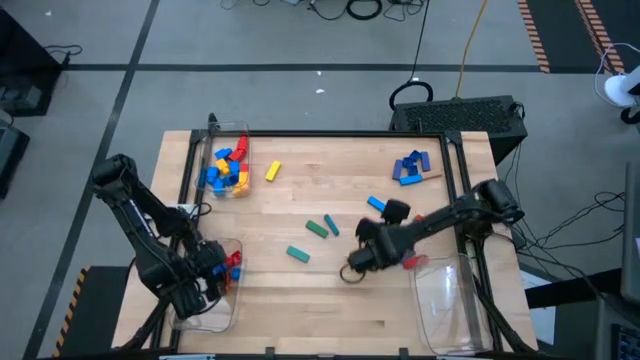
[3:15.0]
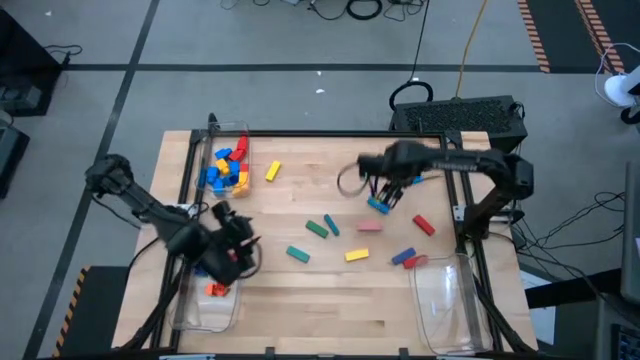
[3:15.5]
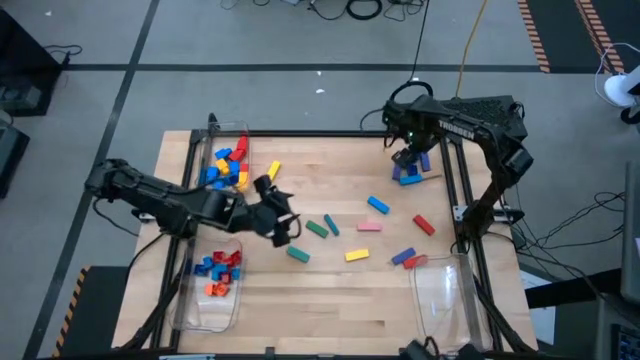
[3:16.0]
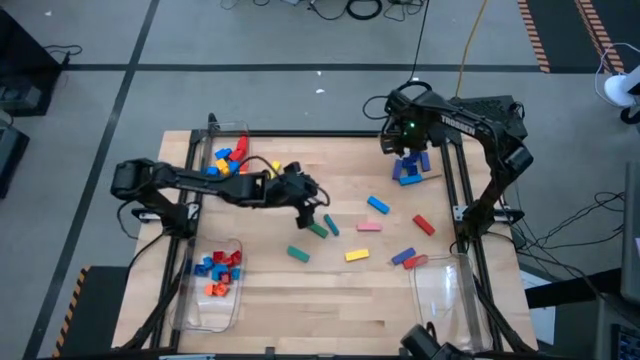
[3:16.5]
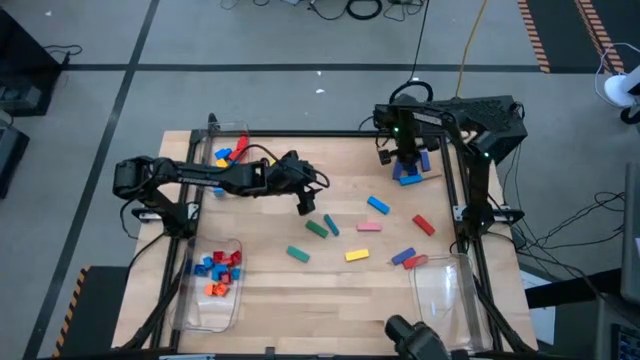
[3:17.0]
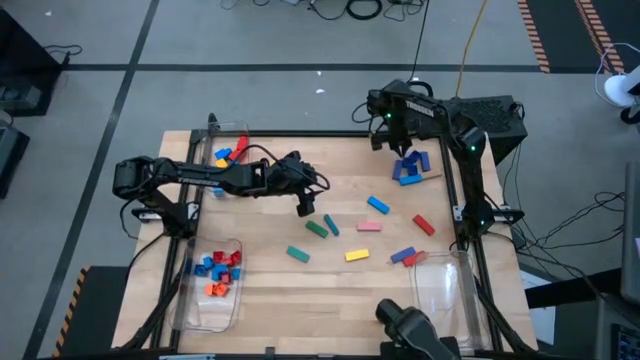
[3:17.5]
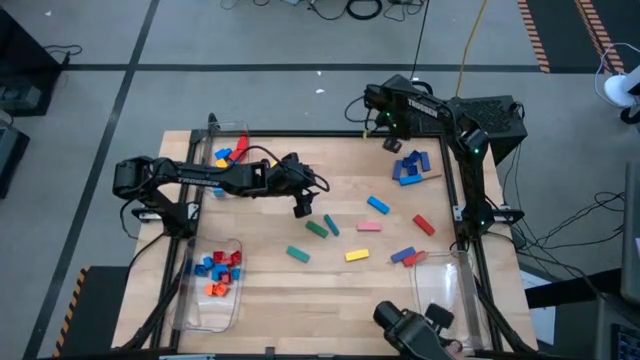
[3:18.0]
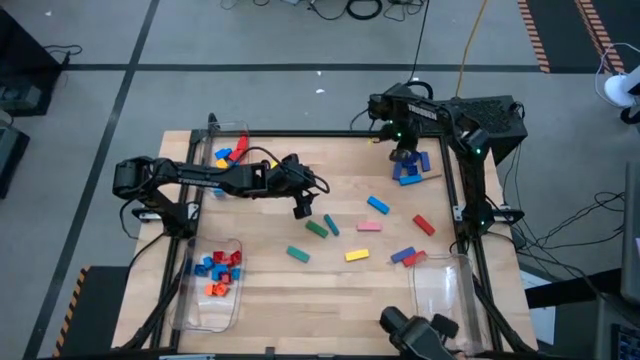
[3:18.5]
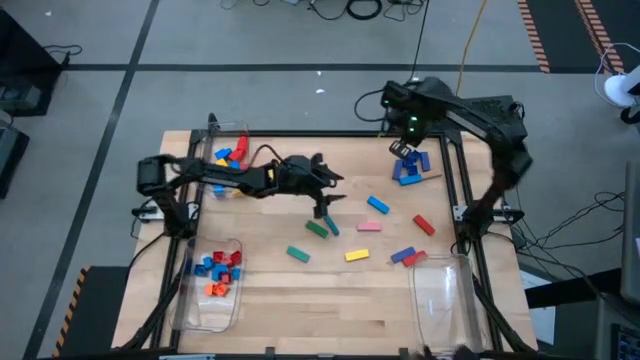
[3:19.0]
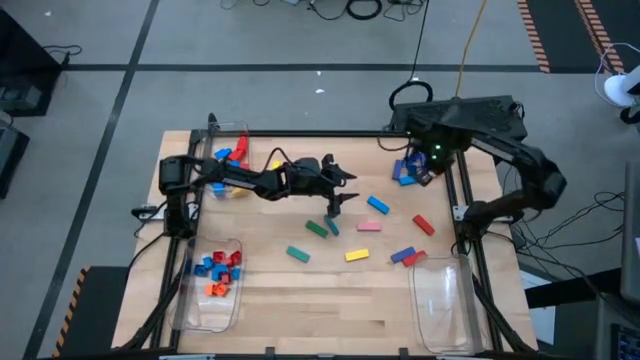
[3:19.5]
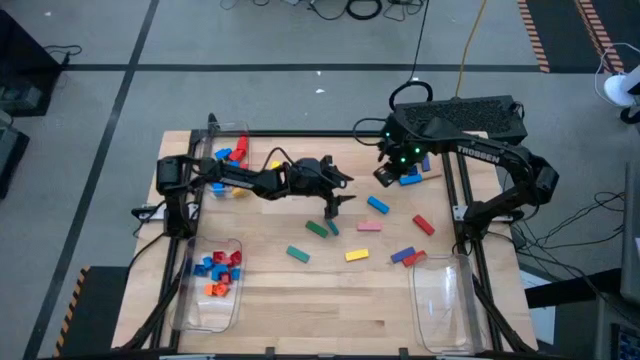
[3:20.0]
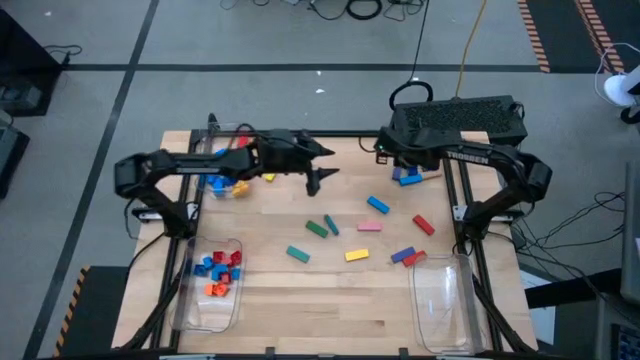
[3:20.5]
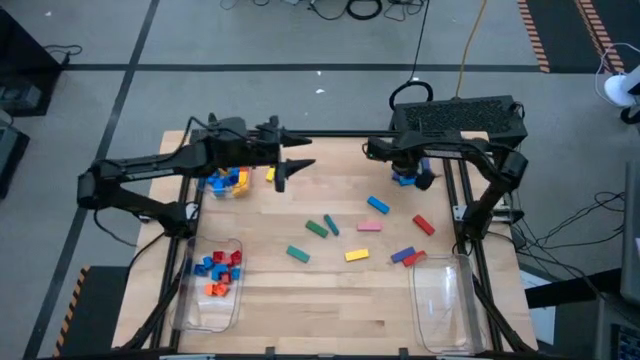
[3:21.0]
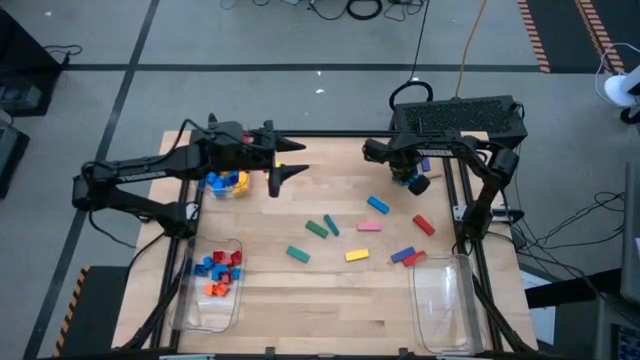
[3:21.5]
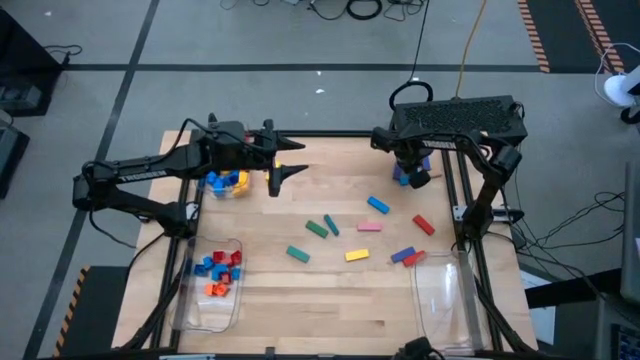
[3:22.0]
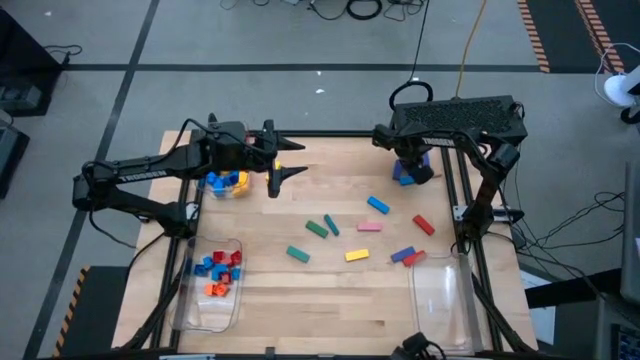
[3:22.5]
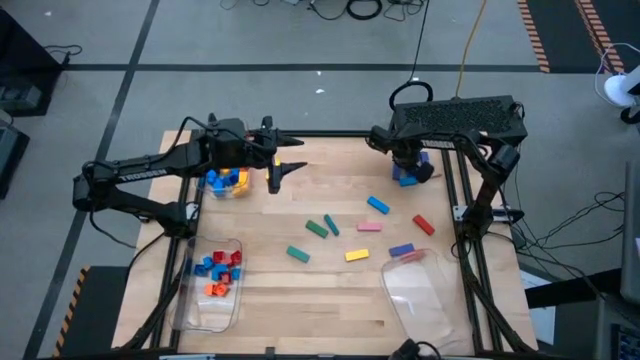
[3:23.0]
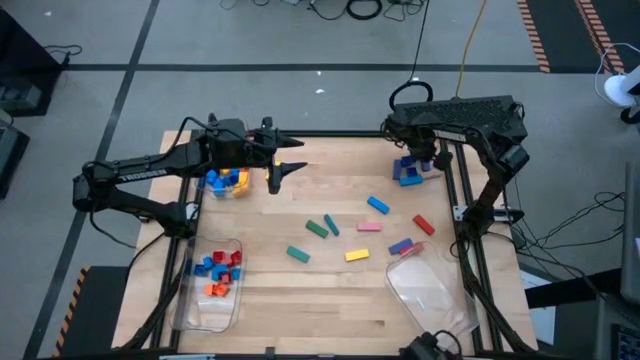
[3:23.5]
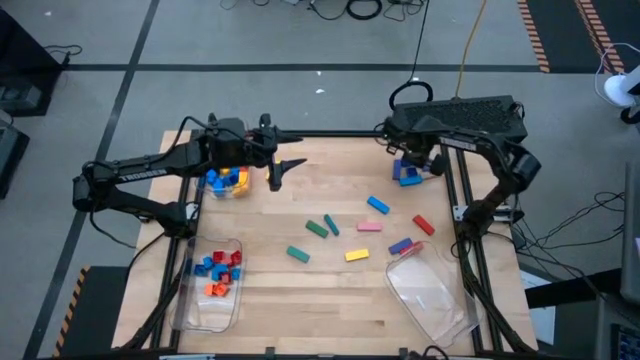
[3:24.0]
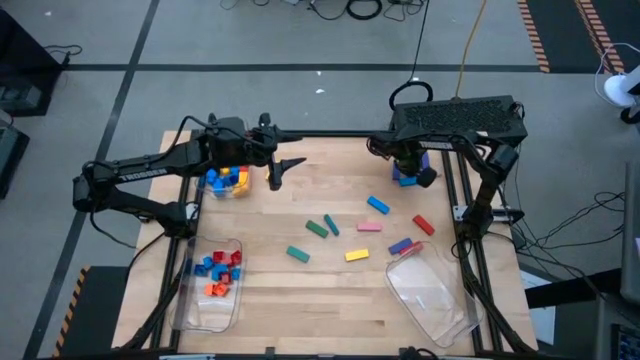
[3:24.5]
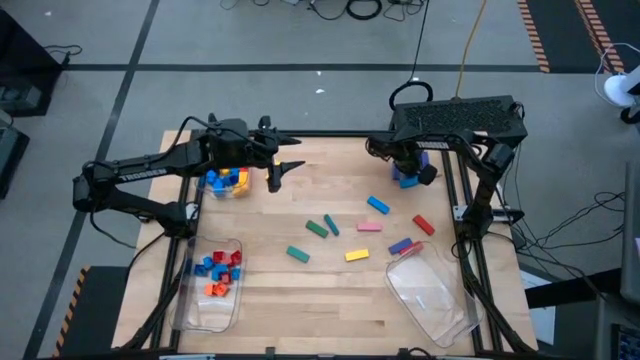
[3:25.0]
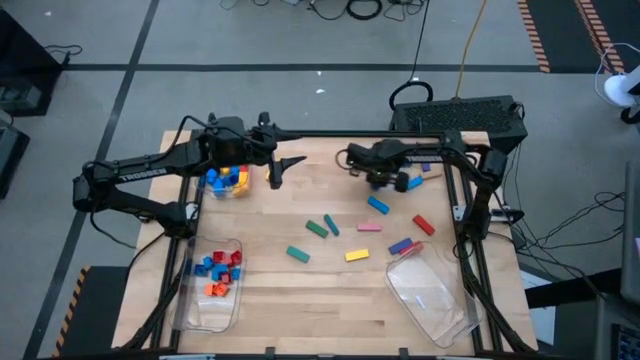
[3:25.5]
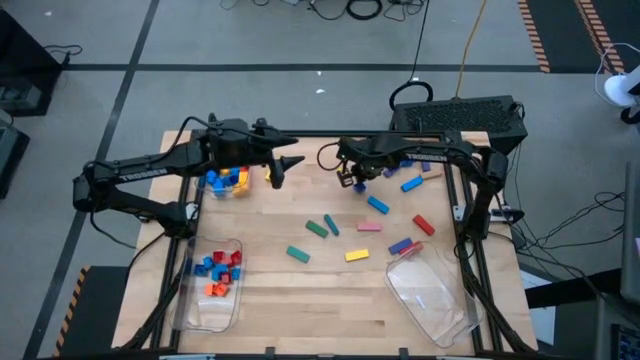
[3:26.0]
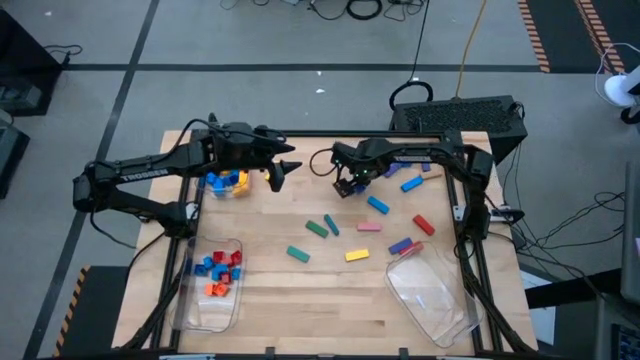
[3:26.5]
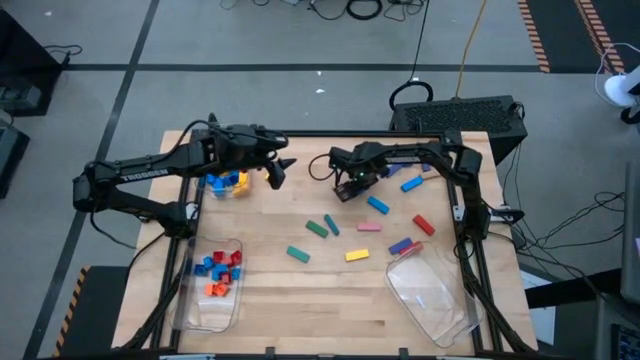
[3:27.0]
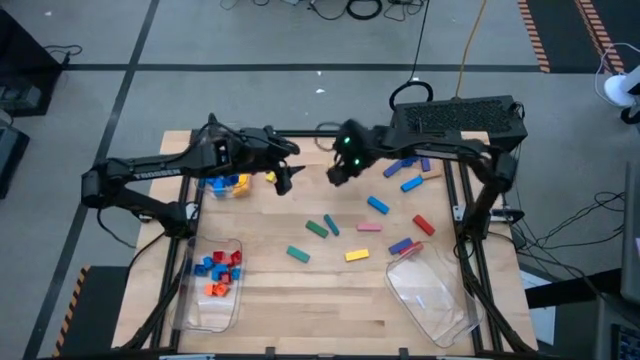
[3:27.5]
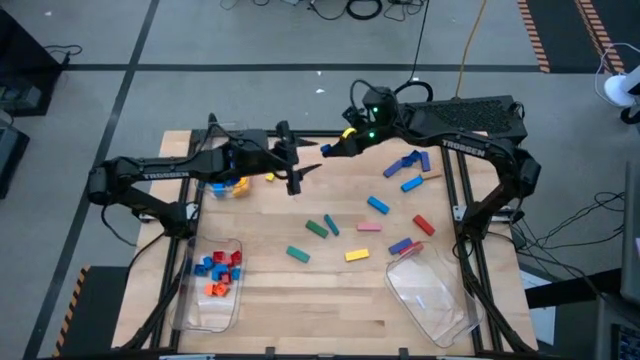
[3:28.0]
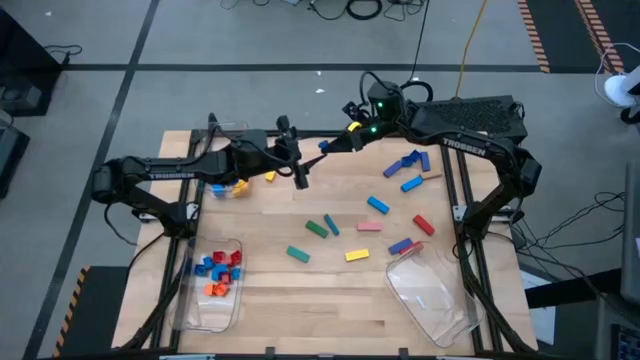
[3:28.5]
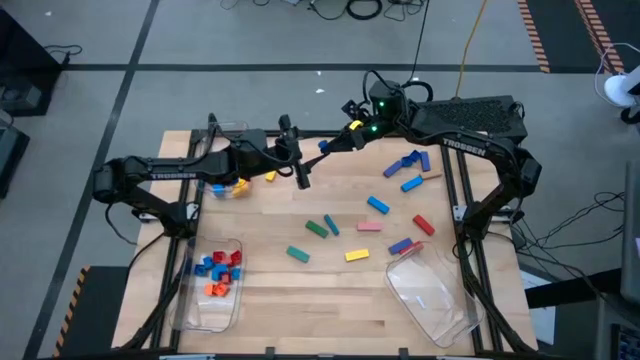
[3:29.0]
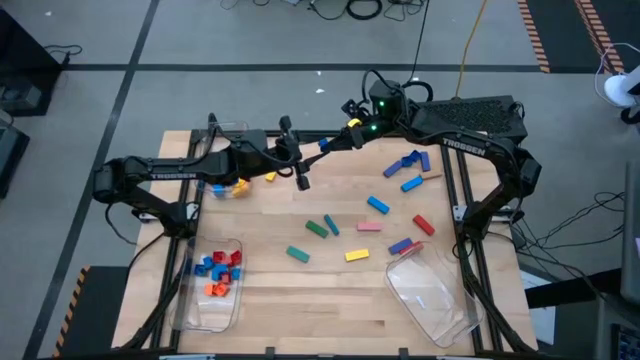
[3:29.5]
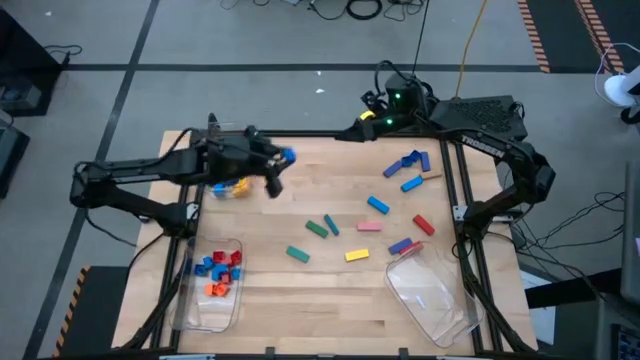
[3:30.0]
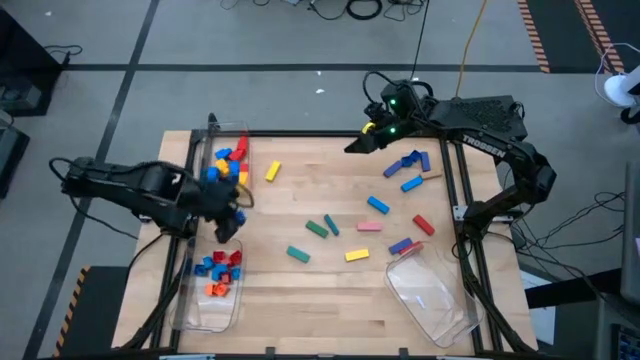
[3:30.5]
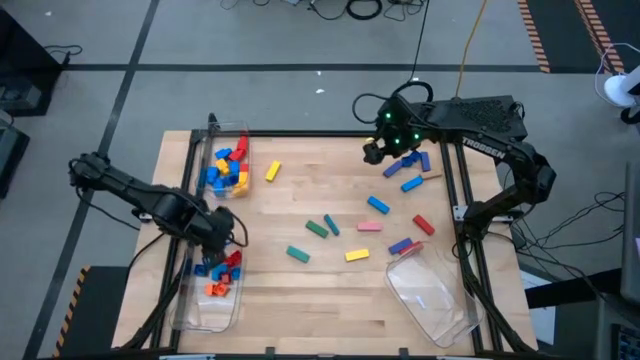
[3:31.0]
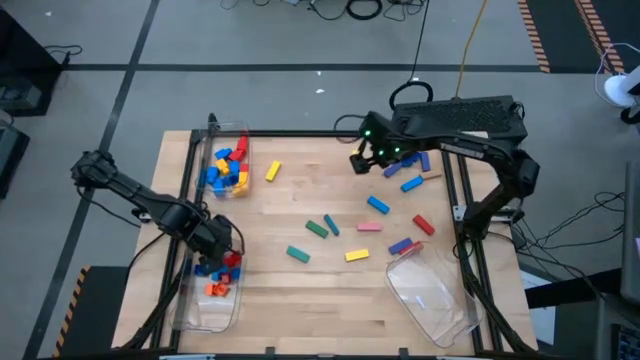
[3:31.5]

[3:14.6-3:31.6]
Task: Sort blocks by size
Put the blue four stud game piece into the bottom left transparent bin

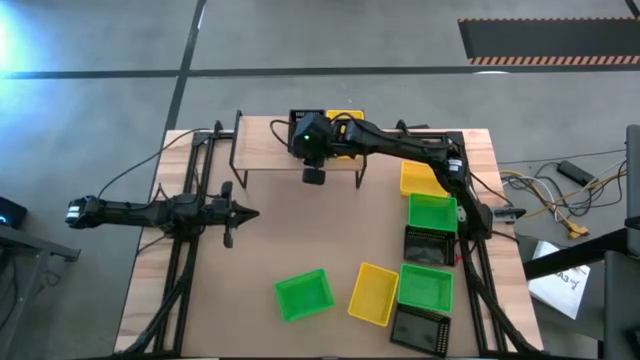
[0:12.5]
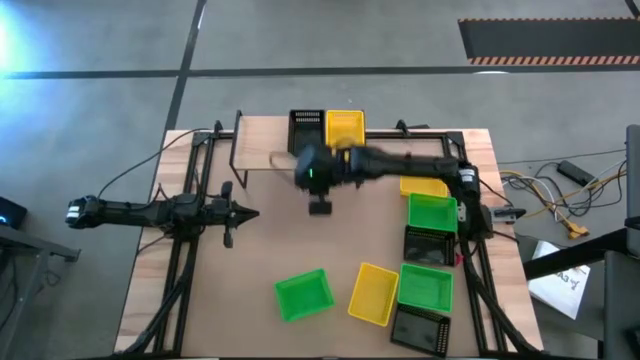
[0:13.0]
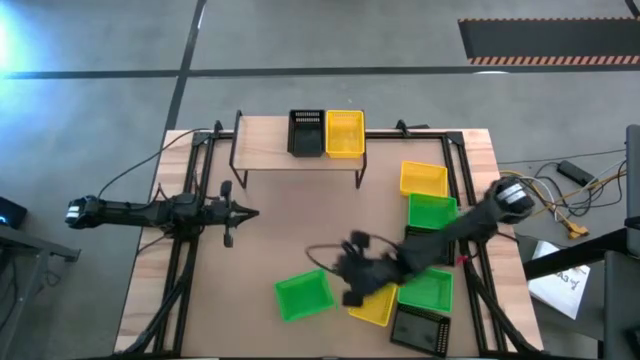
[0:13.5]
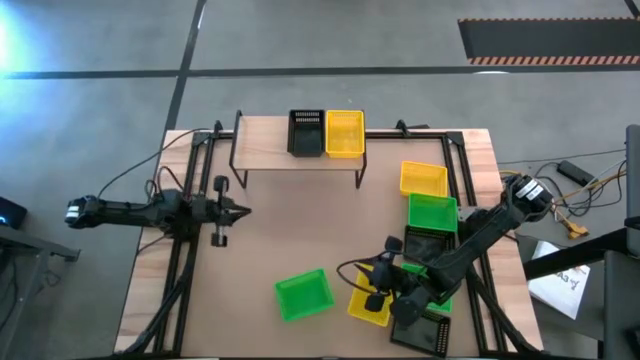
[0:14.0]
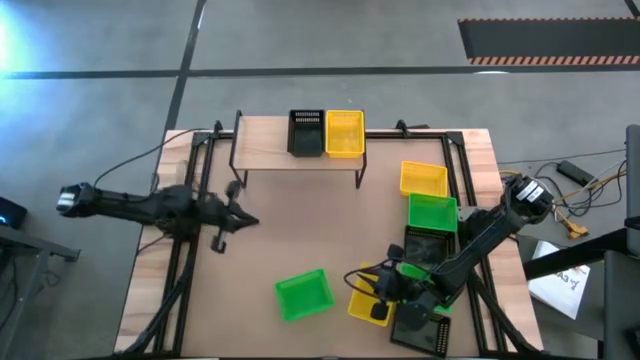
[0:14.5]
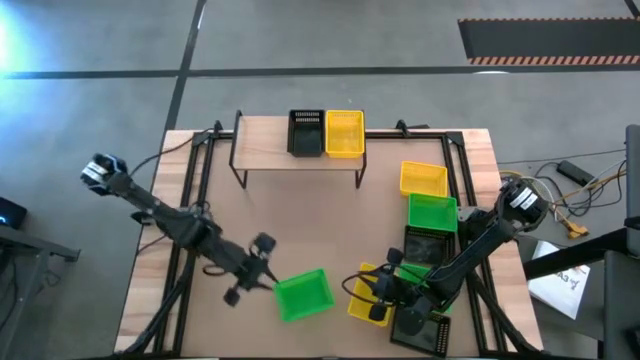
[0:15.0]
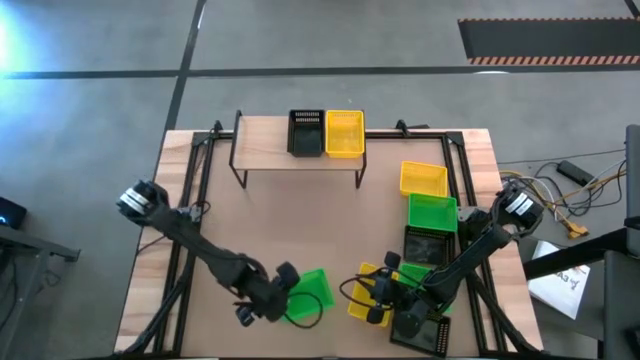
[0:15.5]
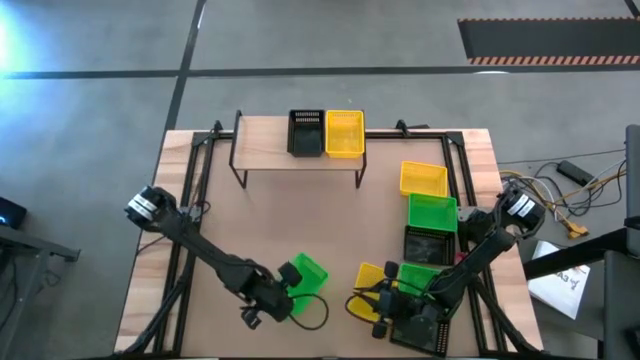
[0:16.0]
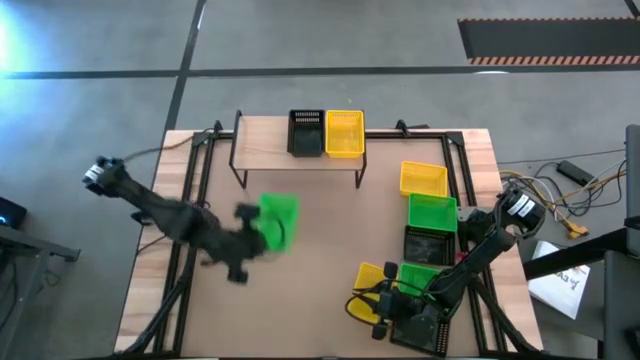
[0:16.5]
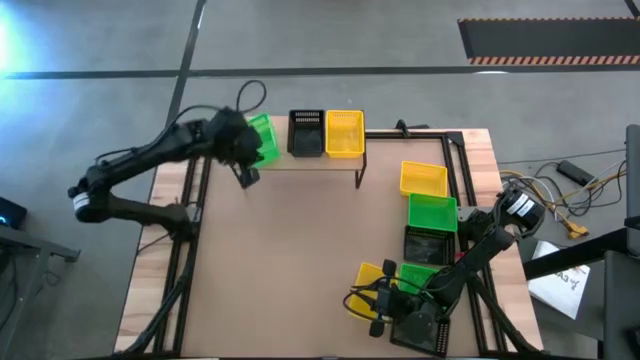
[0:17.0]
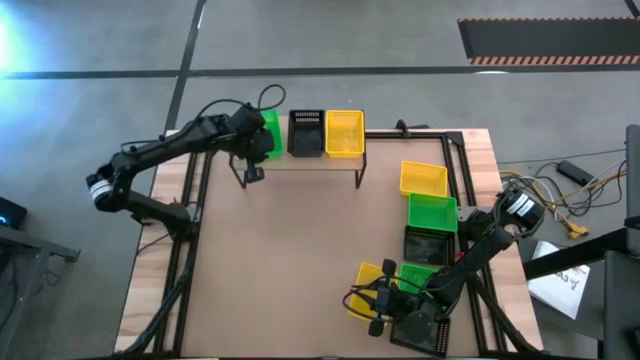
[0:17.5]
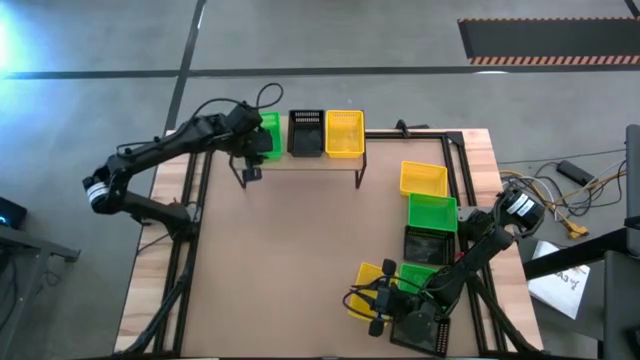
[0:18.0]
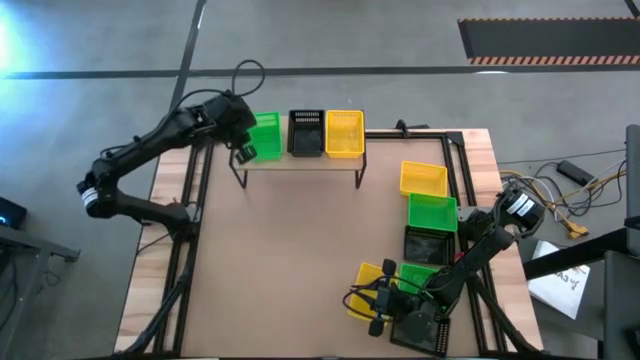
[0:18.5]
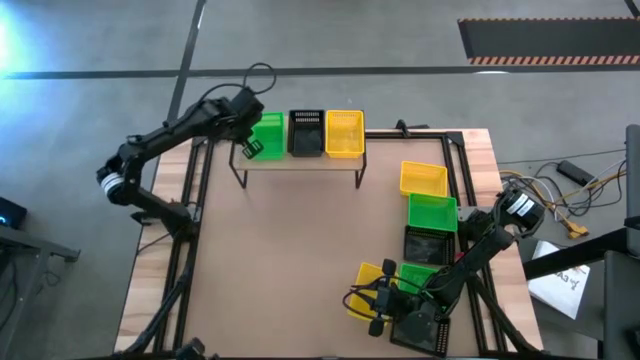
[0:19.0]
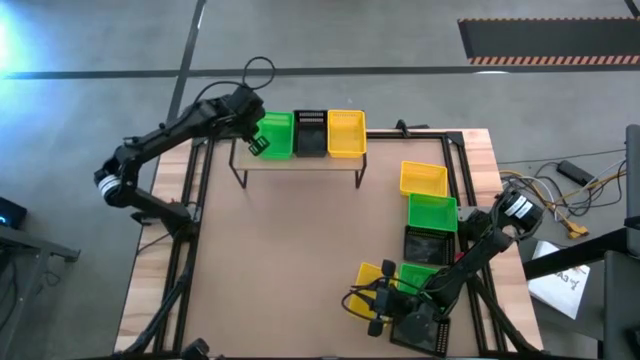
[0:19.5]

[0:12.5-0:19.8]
Task: Stack baskets on shelf by color
Put the bottom left green bin on the shelf
